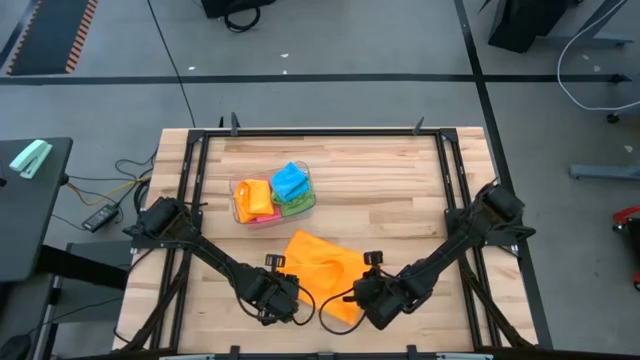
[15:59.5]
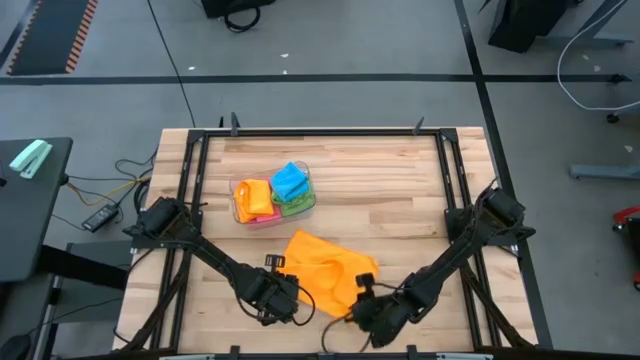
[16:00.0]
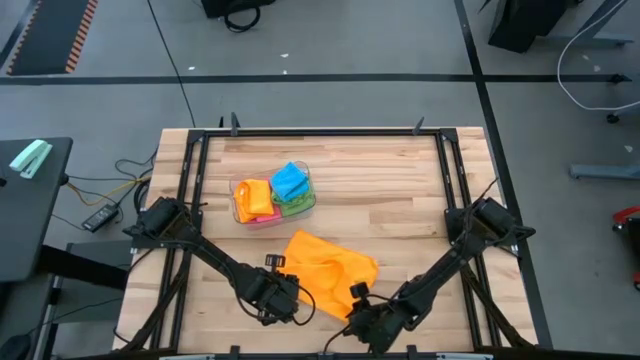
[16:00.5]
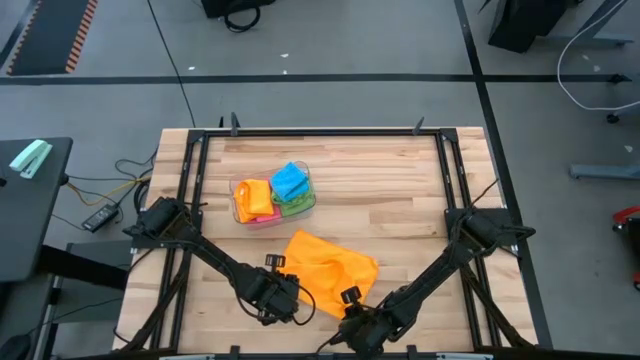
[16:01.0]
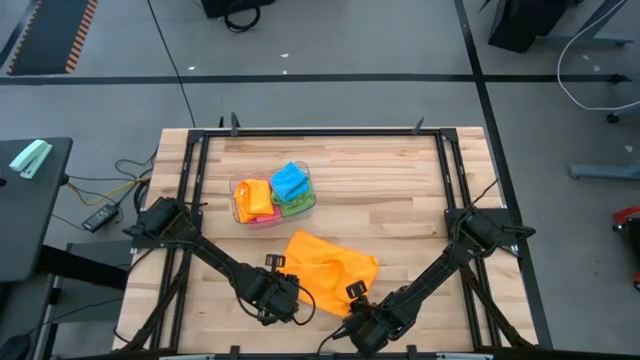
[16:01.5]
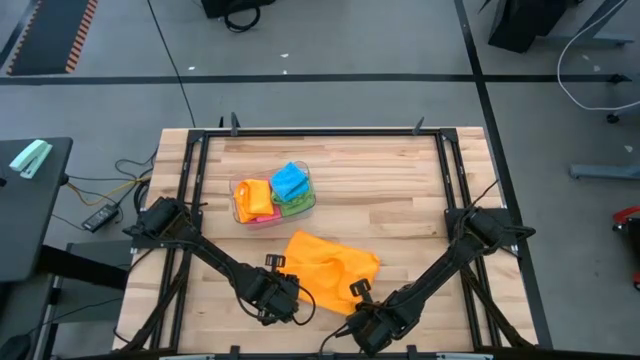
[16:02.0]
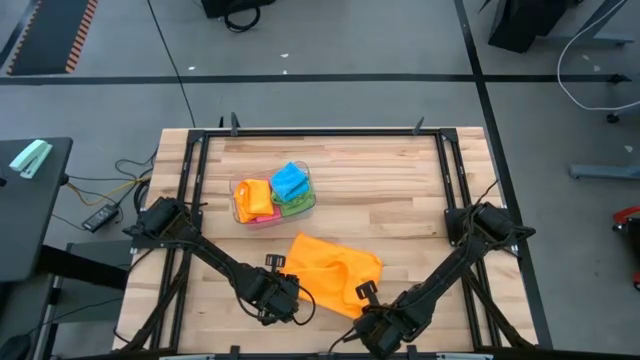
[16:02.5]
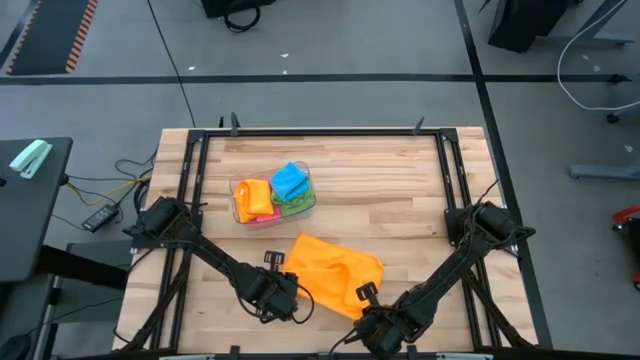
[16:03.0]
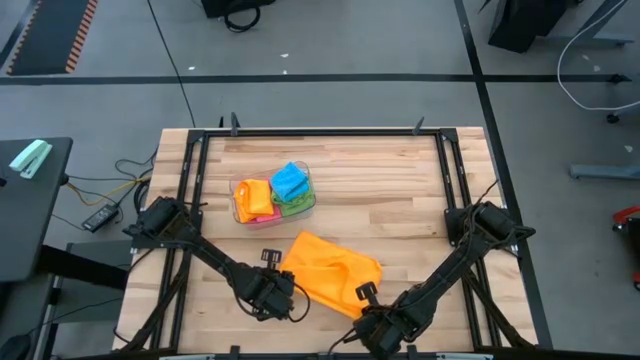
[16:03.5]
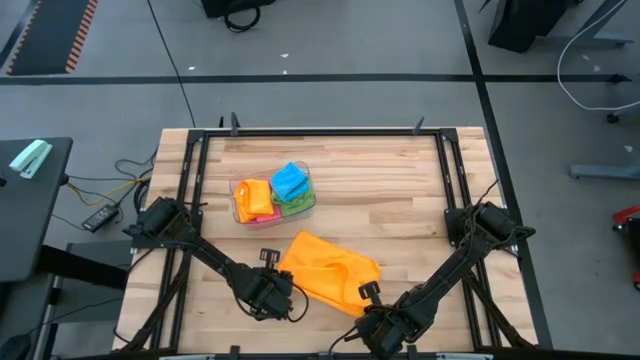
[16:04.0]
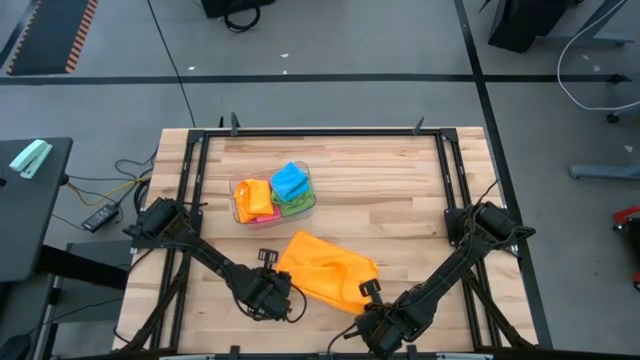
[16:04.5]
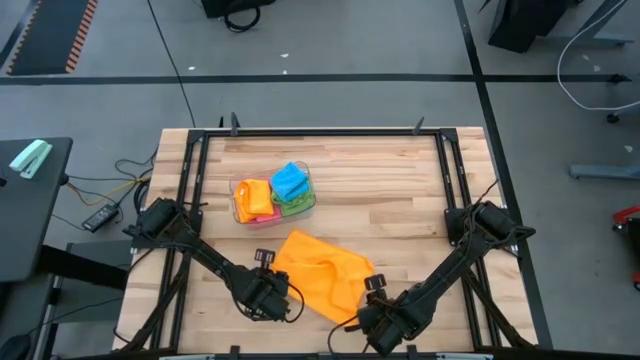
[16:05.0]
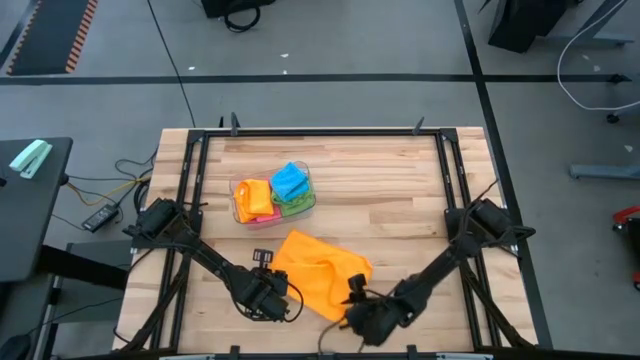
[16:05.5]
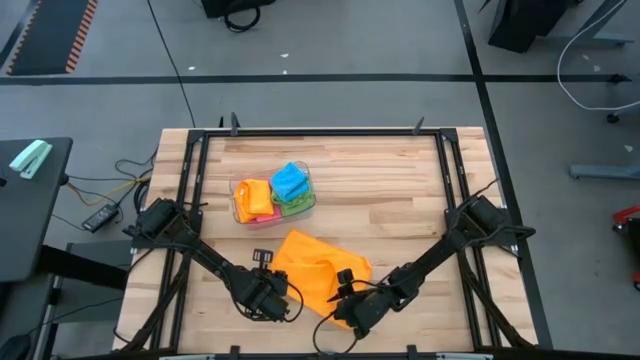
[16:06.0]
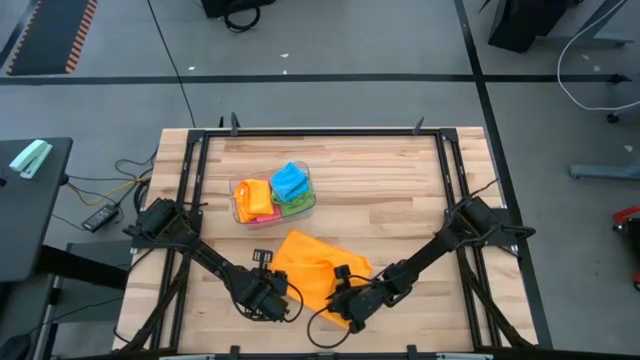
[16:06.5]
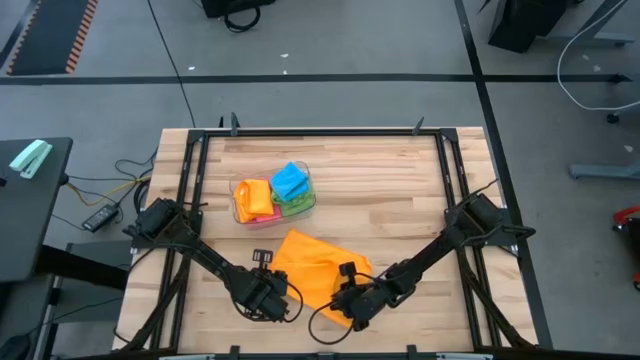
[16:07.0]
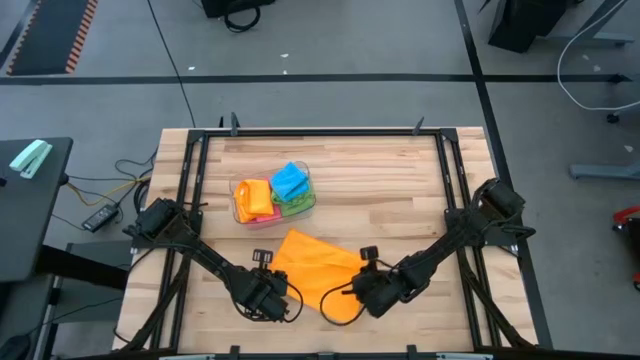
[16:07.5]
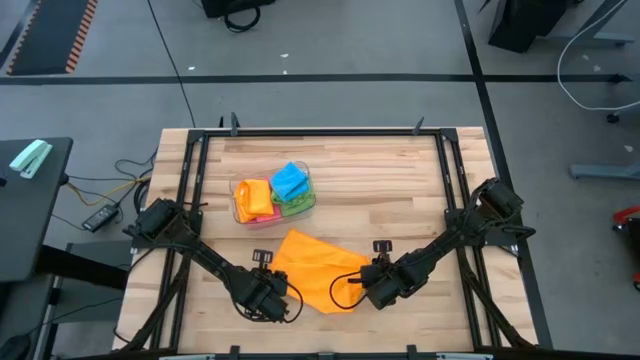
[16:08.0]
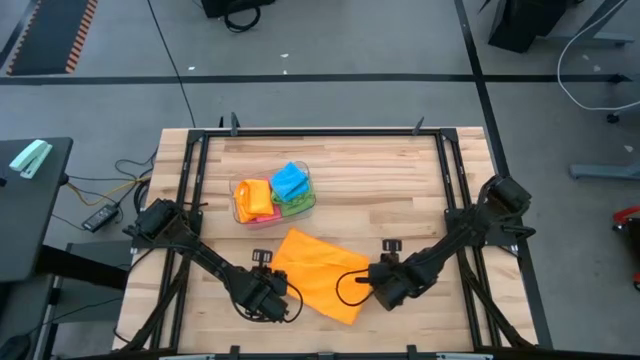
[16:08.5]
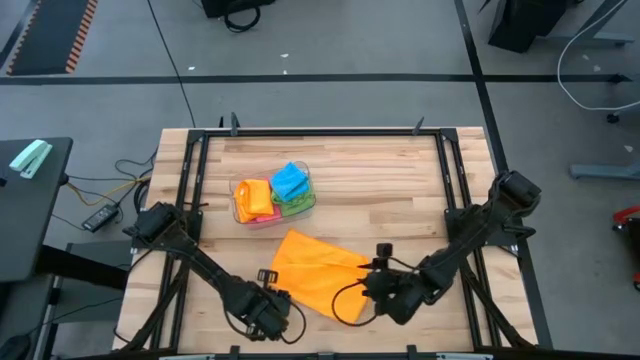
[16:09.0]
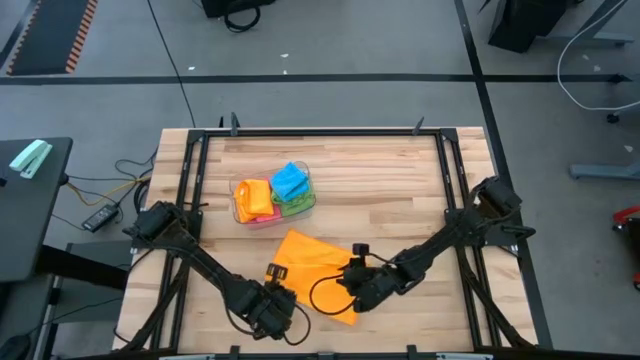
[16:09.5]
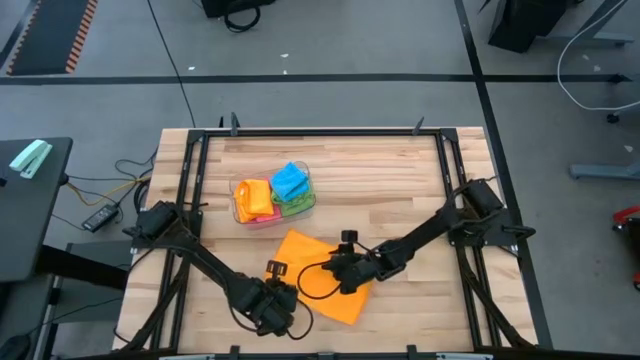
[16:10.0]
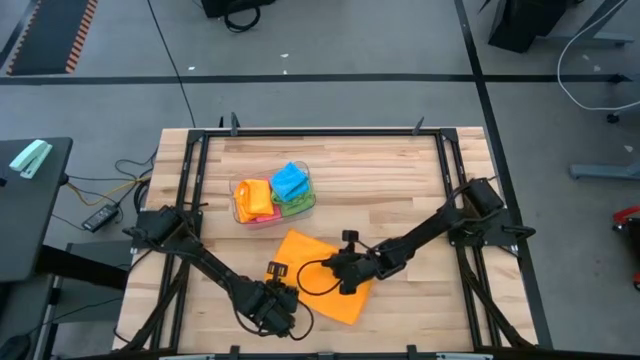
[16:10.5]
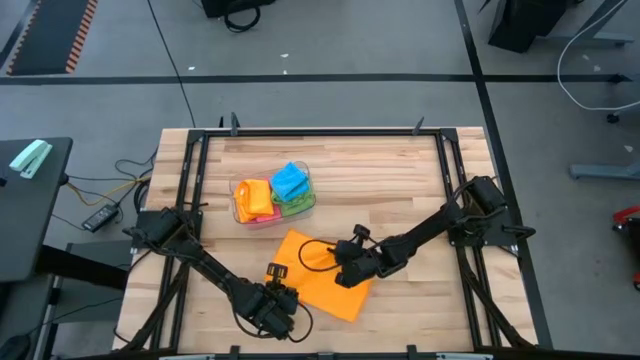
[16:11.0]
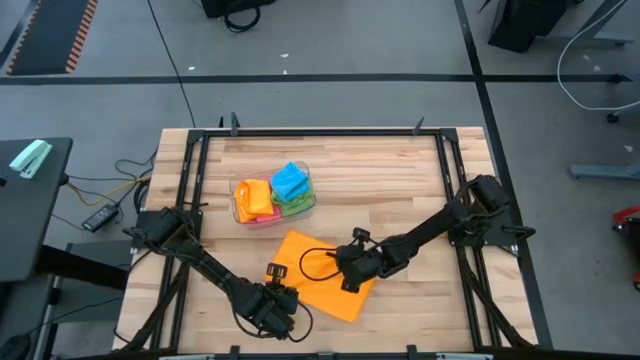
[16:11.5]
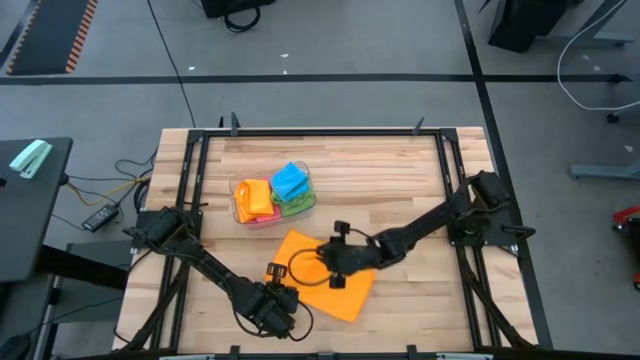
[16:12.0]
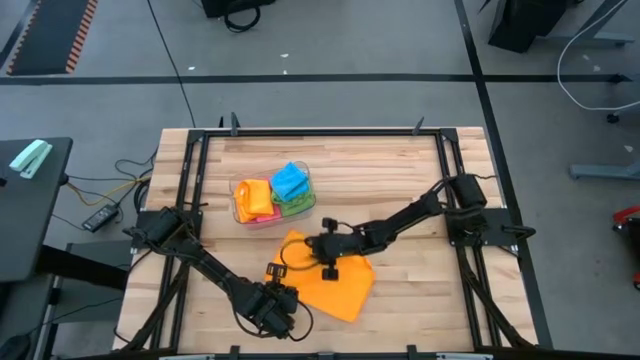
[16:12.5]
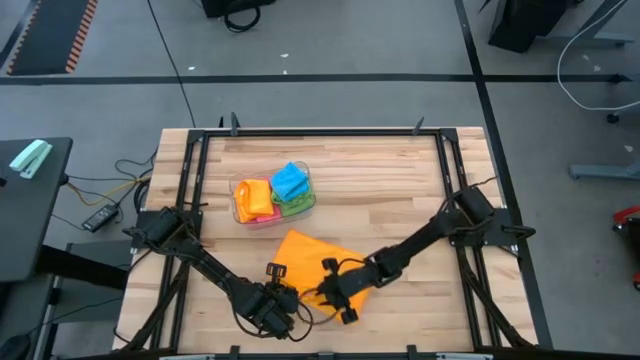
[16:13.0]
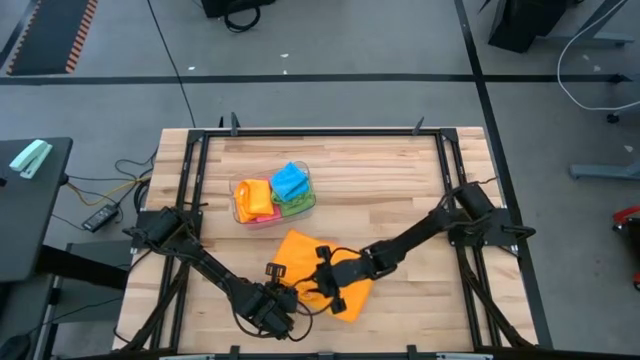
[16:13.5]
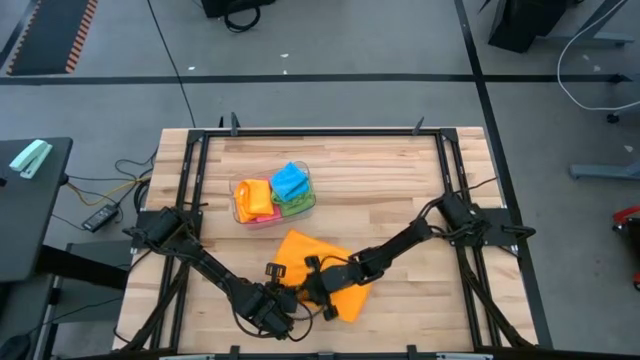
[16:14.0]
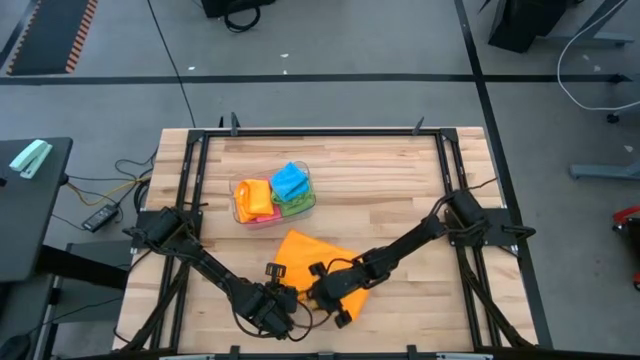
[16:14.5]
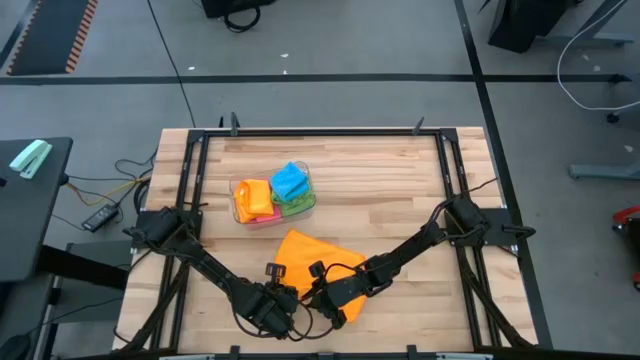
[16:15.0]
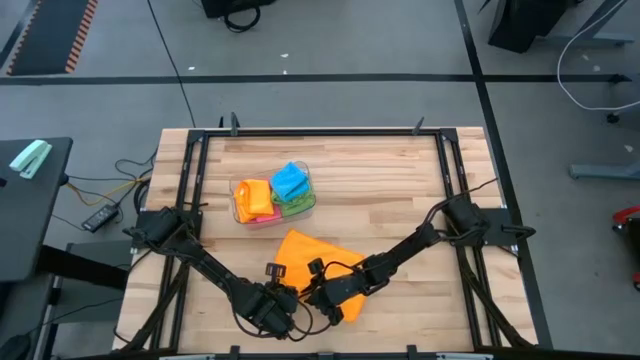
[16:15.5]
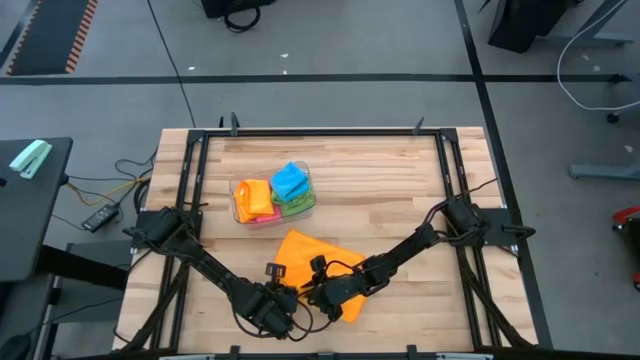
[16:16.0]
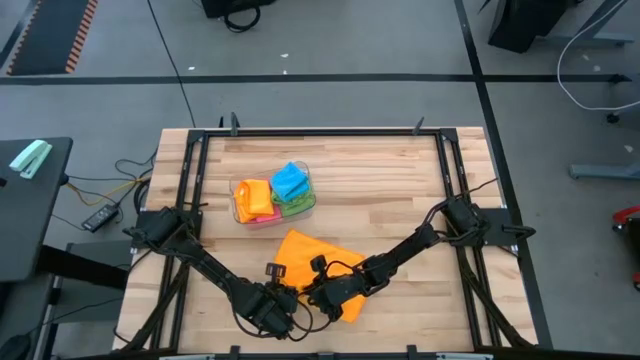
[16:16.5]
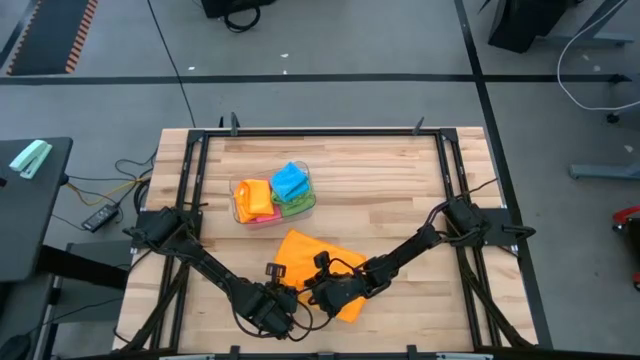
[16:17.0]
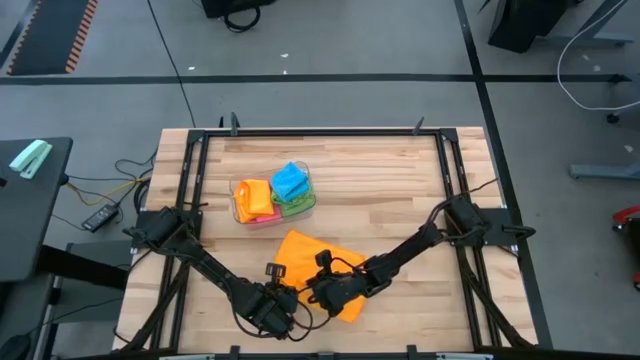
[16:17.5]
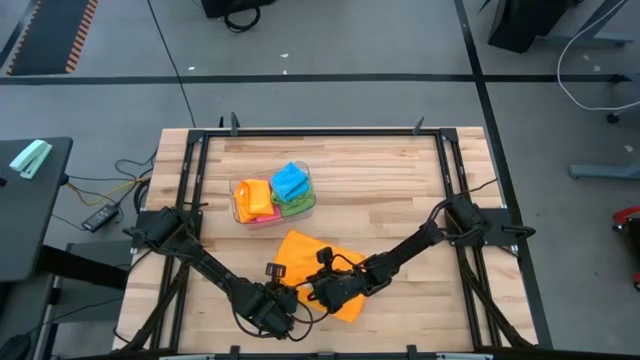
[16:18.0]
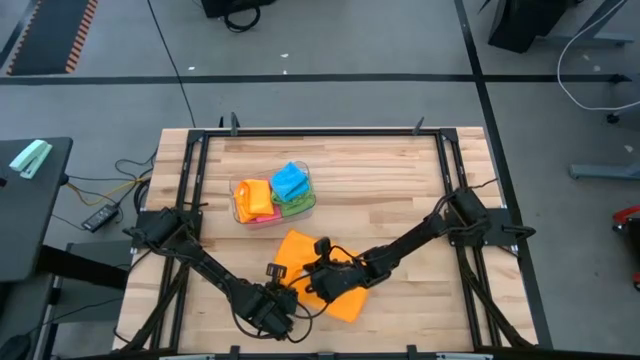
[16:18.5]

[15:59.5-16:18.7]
Task: Fold microfiber towels
Fold the yellow microfiber towel
